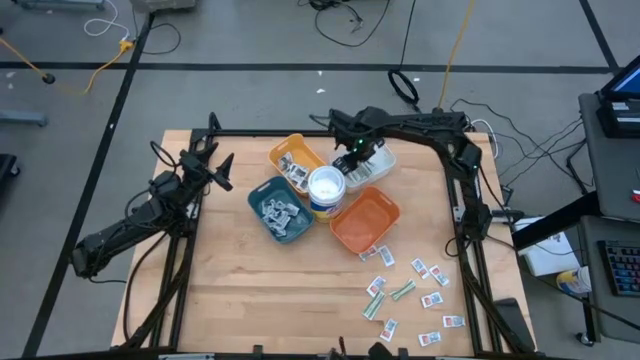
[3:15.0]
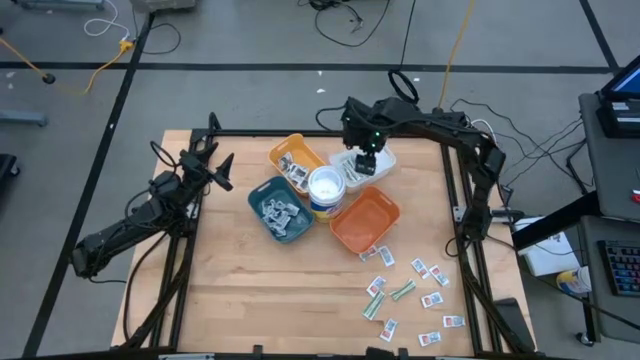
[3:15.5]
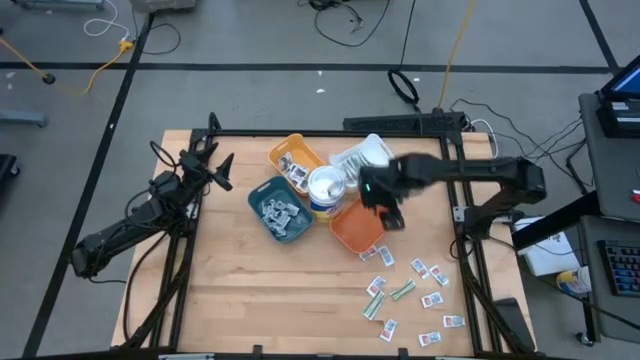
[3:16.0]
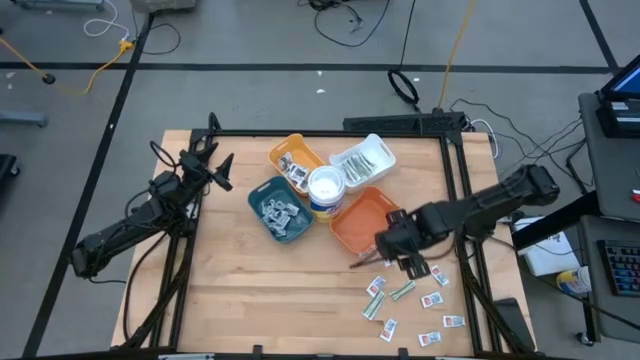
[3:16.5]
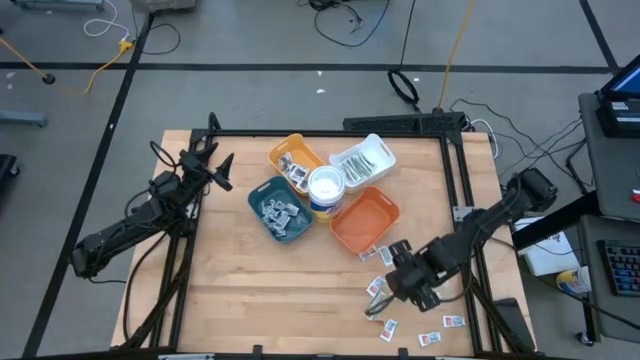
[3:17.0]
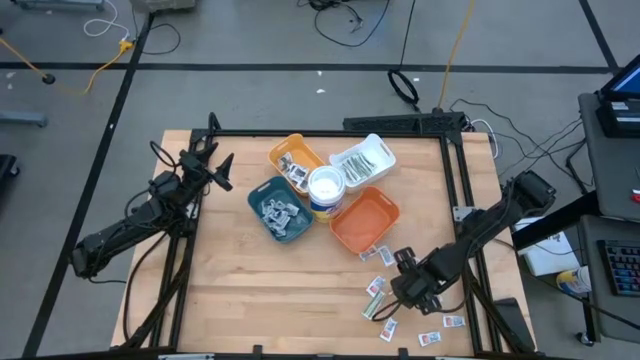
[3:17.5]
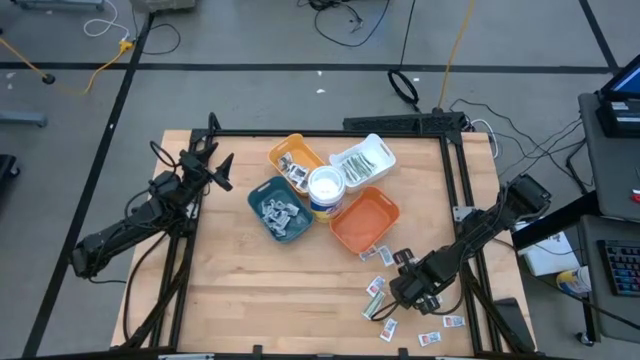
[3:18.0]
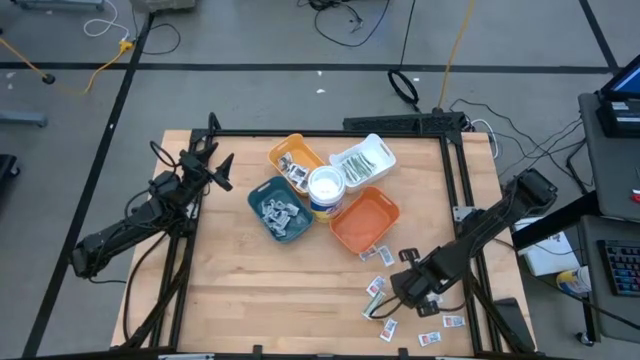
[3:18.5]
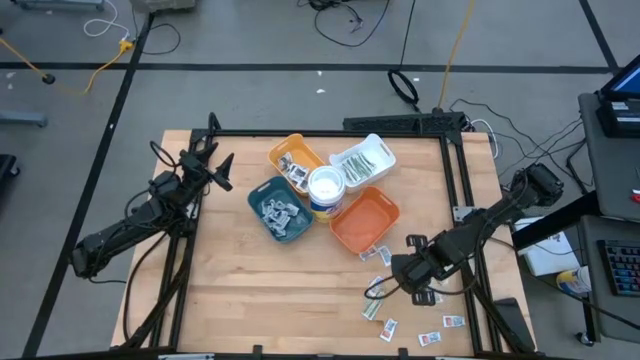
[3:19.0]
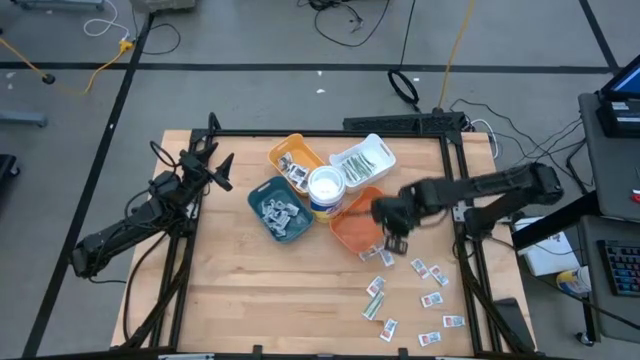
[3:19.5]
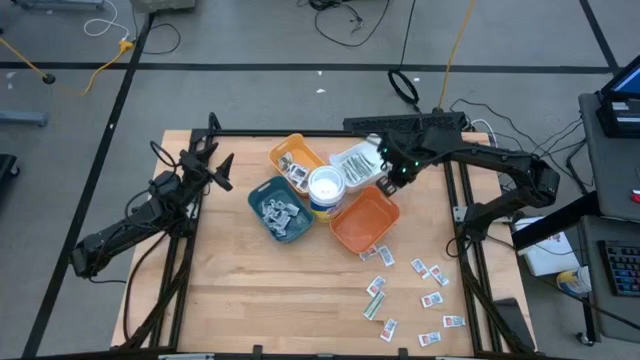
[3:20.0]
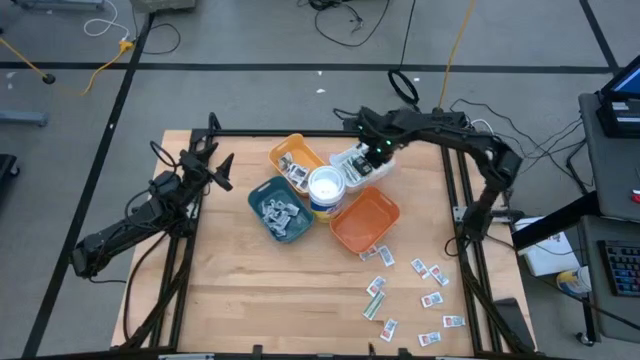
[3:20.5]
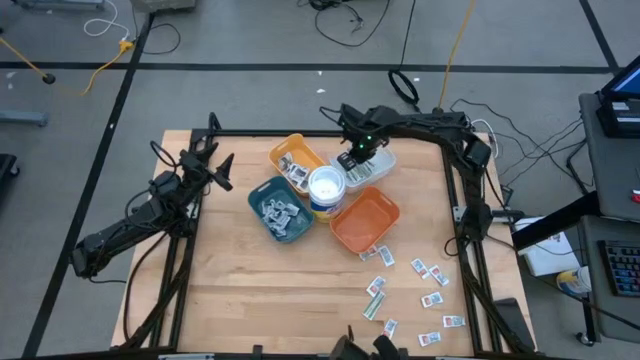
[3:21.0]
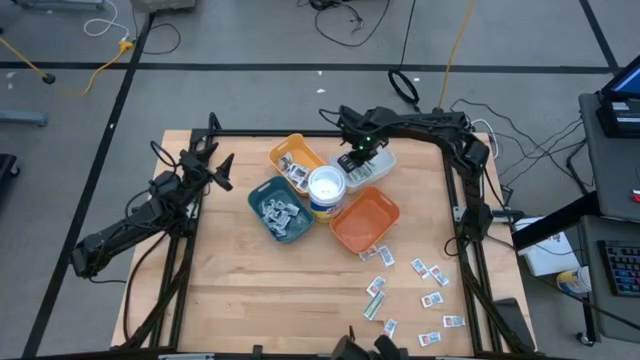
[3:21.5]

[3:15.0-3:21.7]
Task: Pick & Place First Aid Supplies
Put the green bandage into the white bin

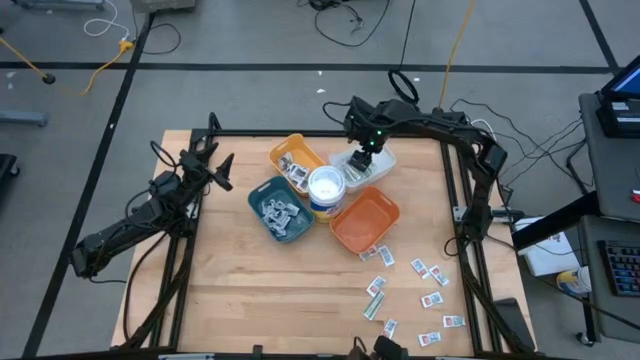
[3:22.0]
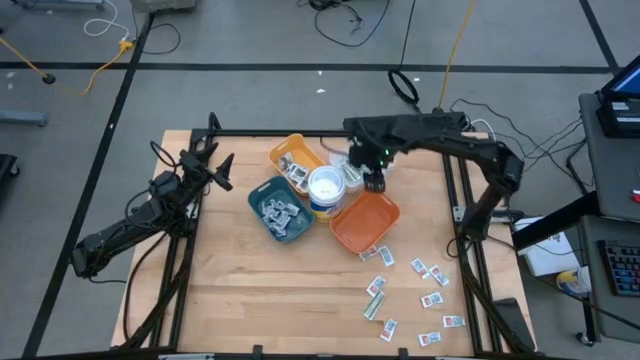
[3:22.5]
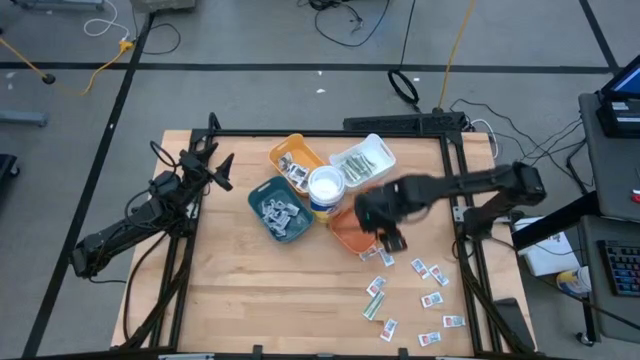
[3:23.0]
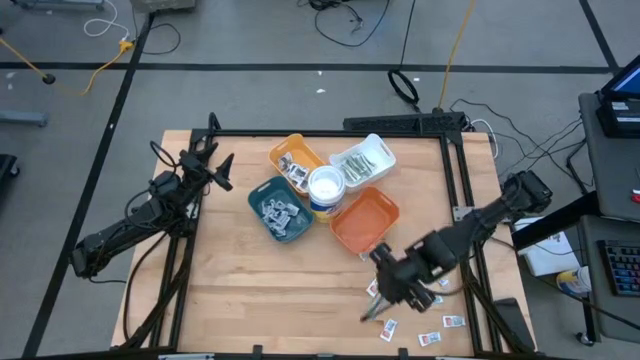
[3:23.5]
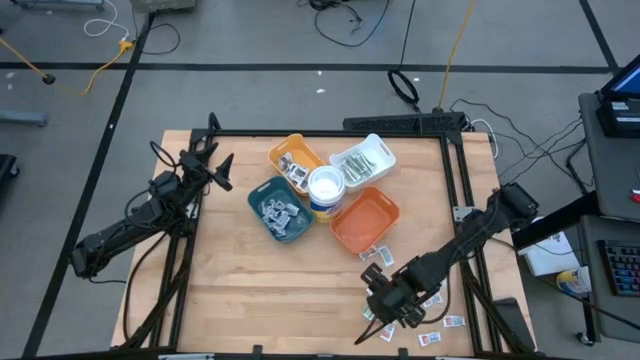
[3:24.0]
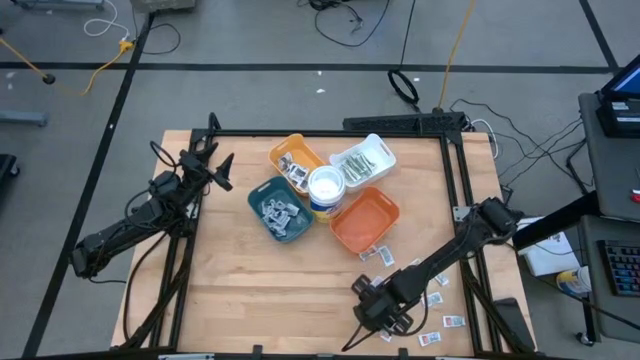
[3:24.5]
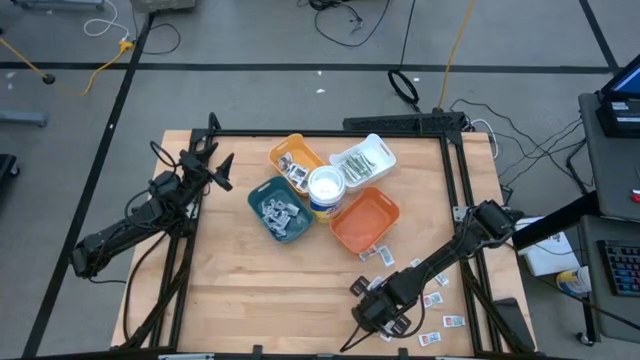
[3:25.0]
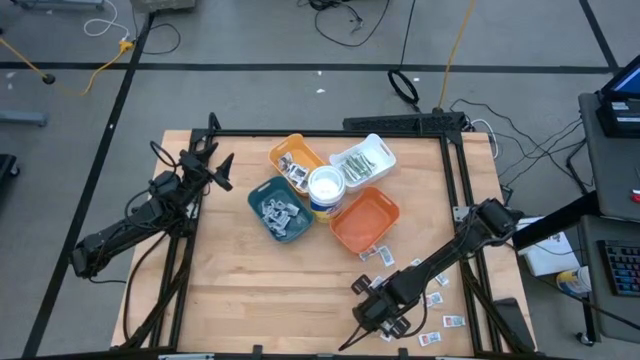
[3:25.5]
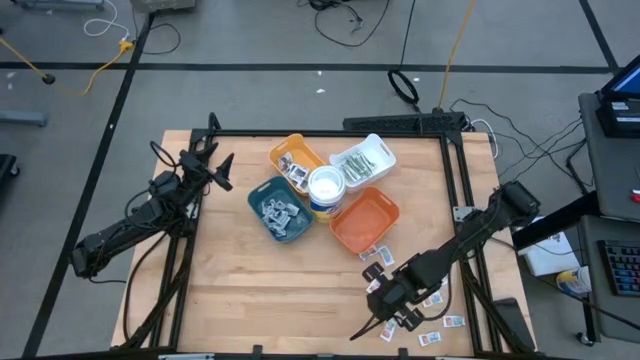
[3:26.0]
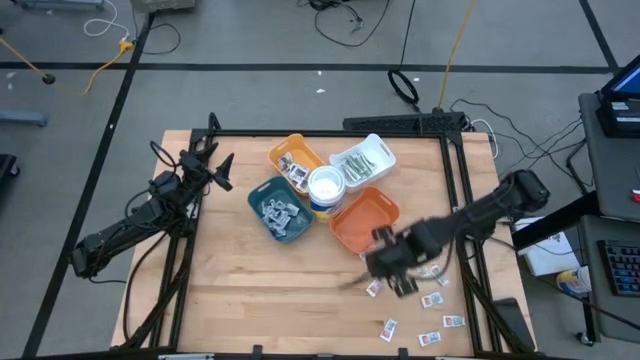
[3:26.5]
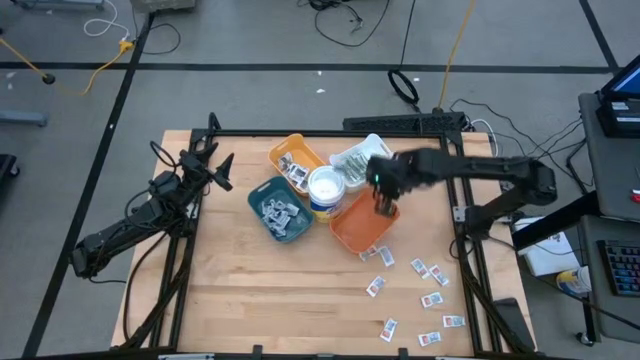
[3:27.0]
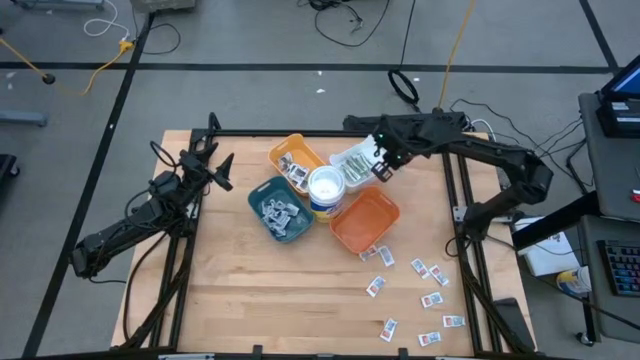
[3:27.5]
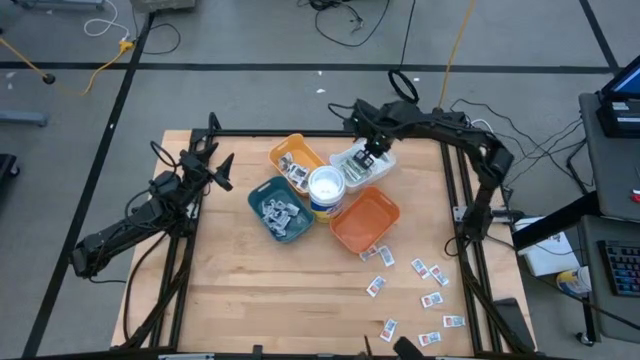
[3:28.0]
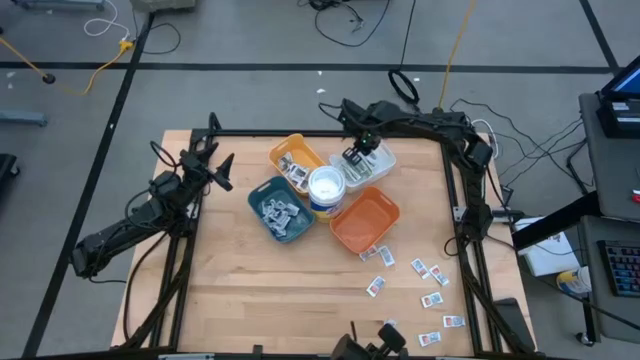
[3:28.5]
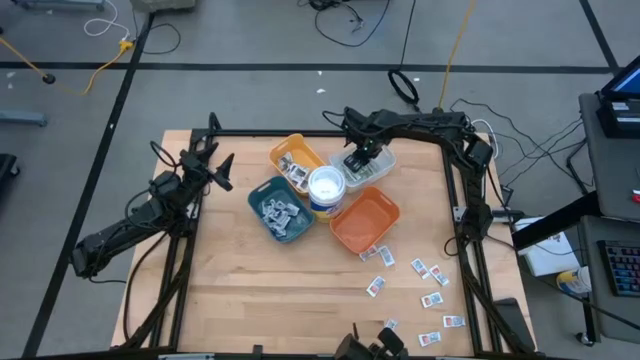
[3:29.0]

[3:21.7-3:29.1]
Put the green bandage into the white bin

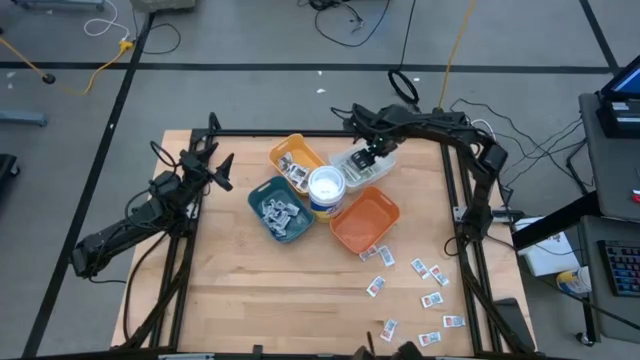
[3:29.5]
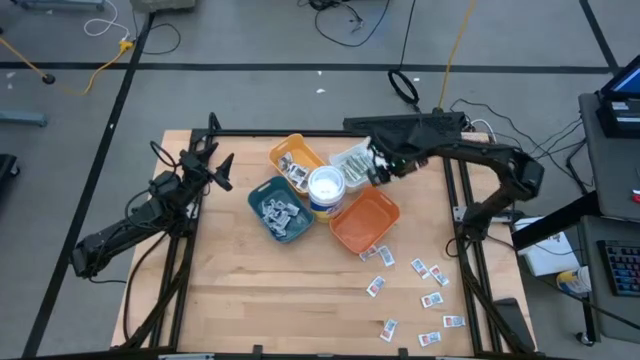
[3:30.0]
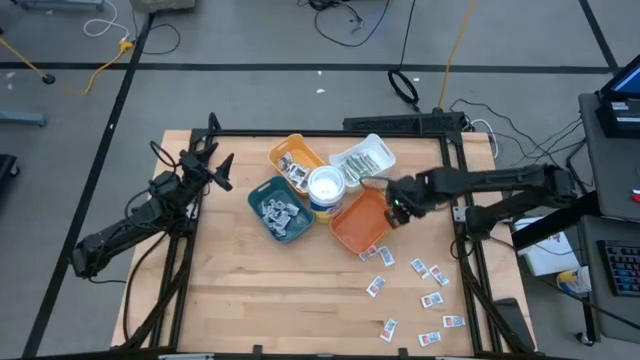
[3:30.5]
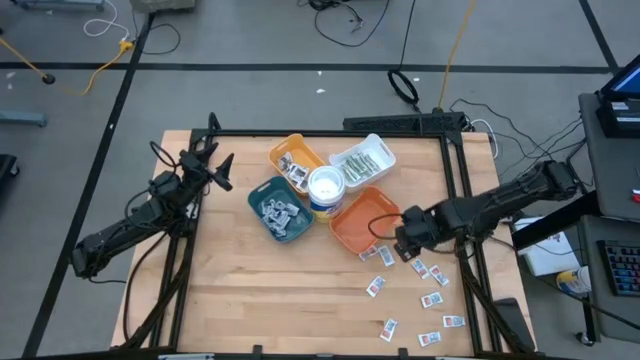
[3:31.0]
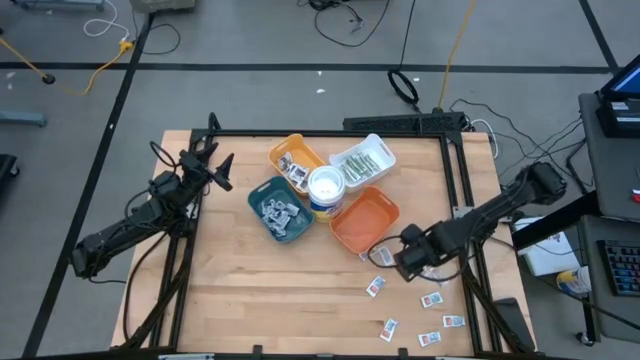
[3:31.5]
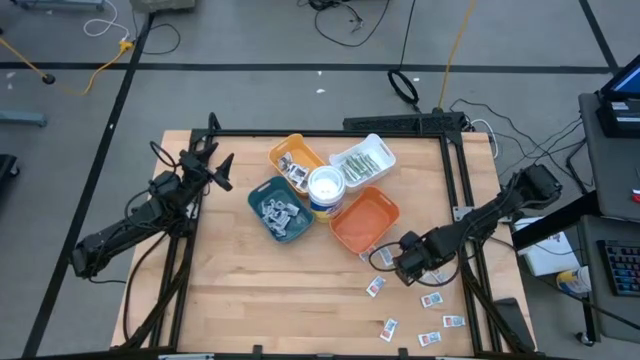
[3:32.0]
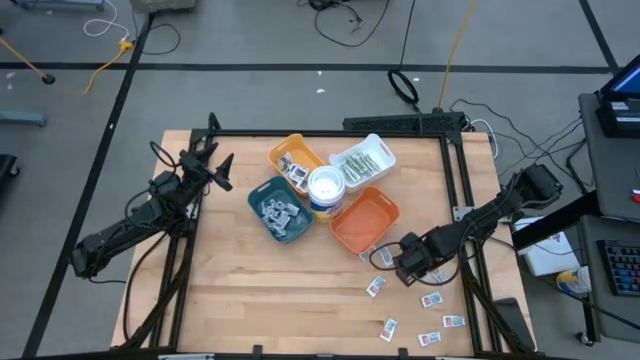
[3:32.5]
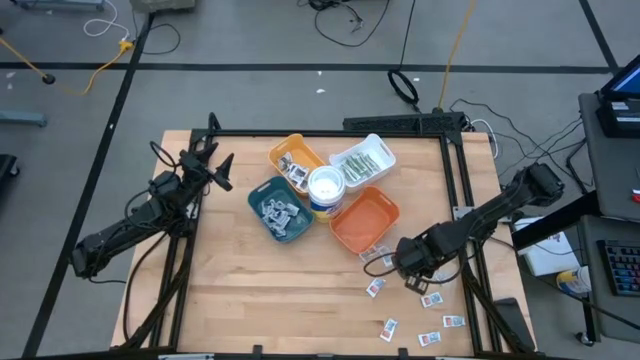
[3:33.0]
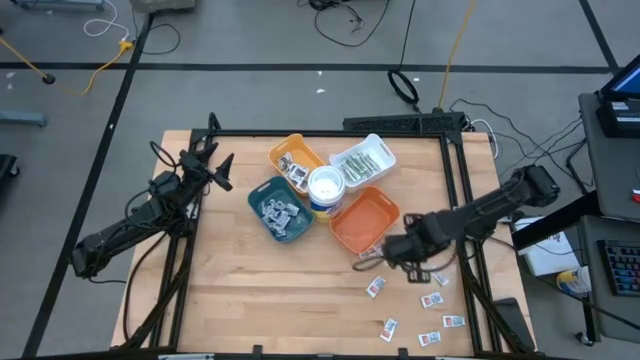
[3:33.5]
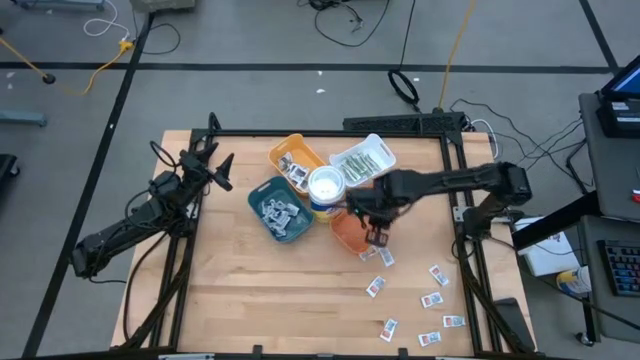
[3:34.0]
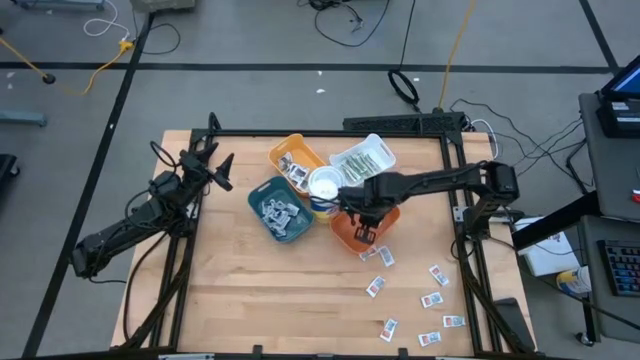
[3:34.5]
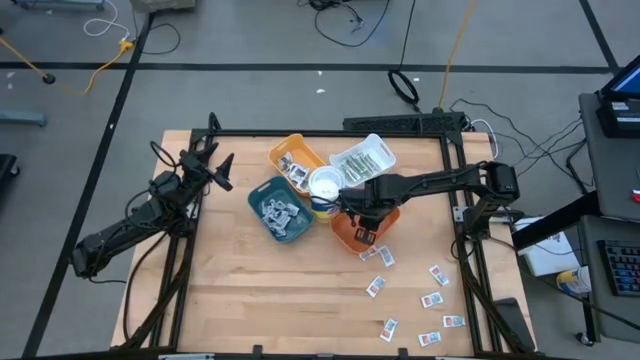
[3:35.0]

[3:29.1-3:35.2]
Put the orange pad into the orange bin
